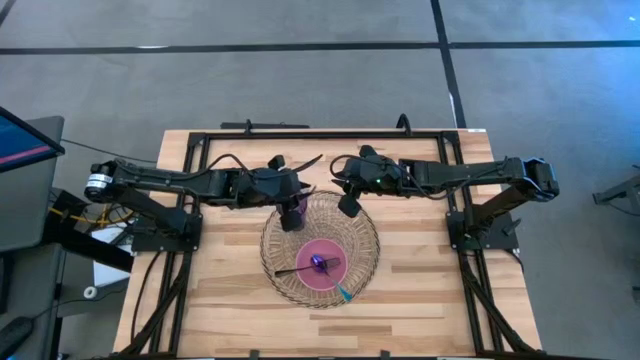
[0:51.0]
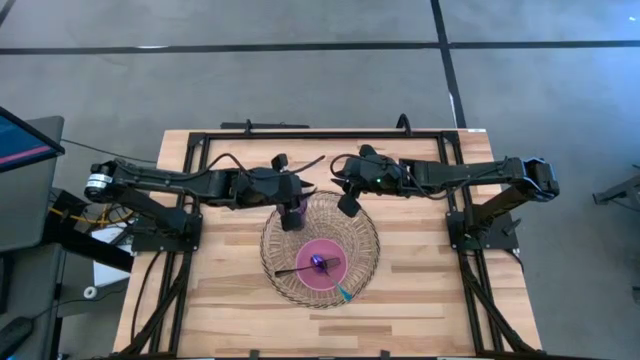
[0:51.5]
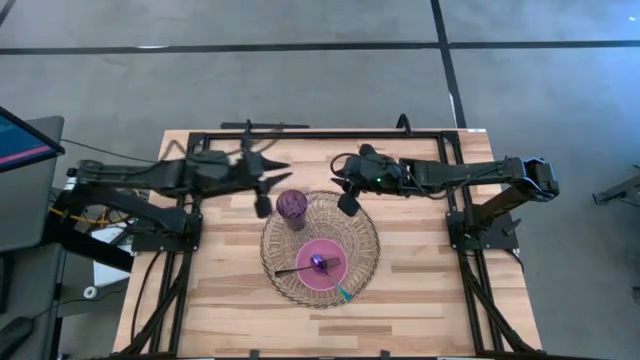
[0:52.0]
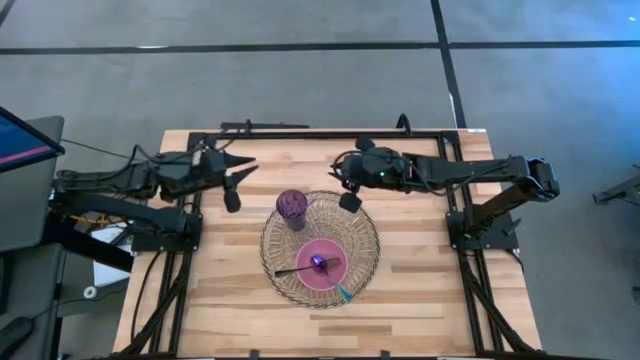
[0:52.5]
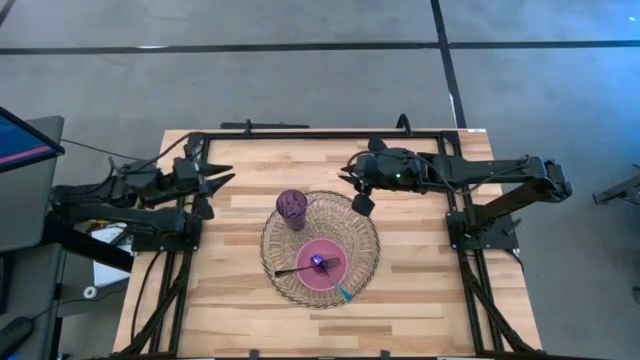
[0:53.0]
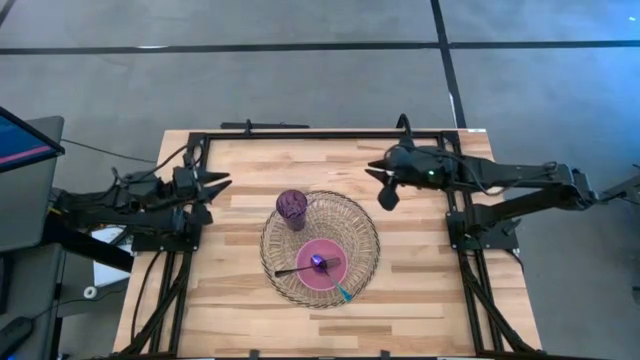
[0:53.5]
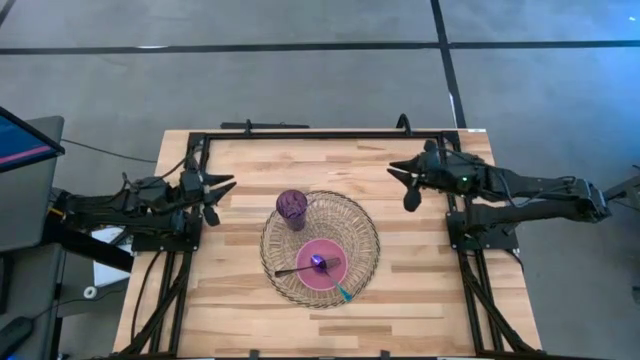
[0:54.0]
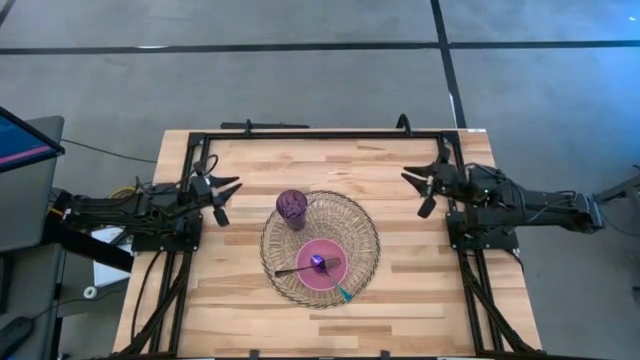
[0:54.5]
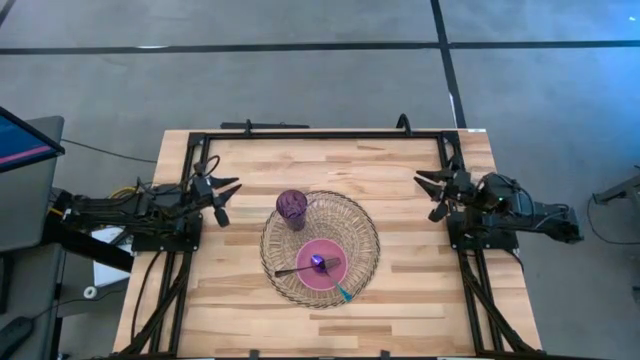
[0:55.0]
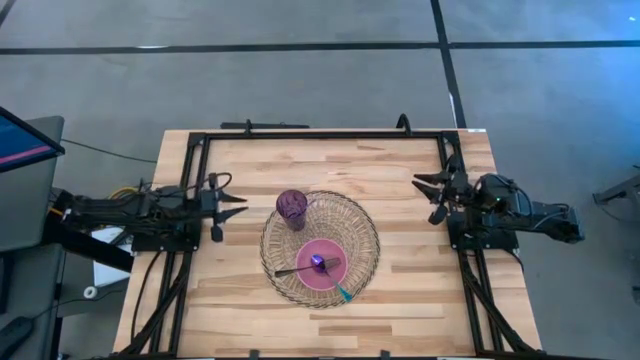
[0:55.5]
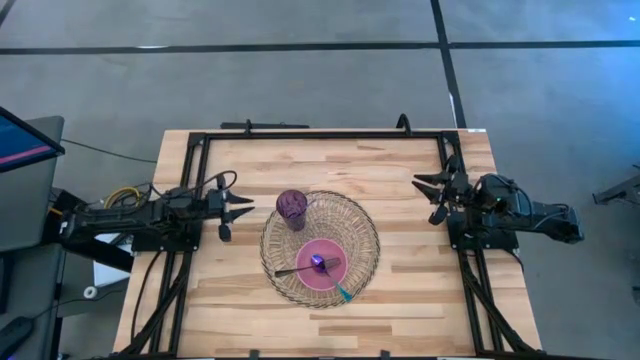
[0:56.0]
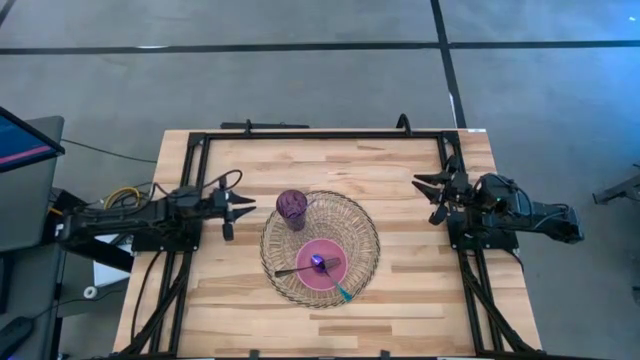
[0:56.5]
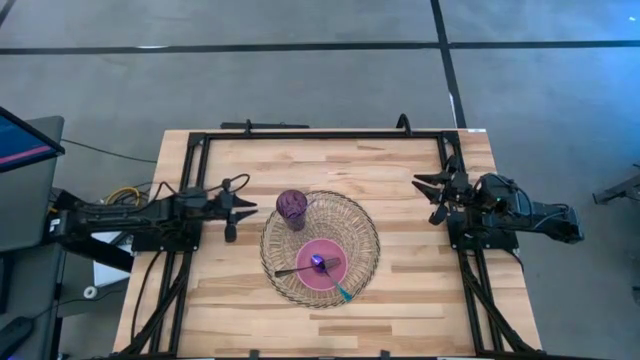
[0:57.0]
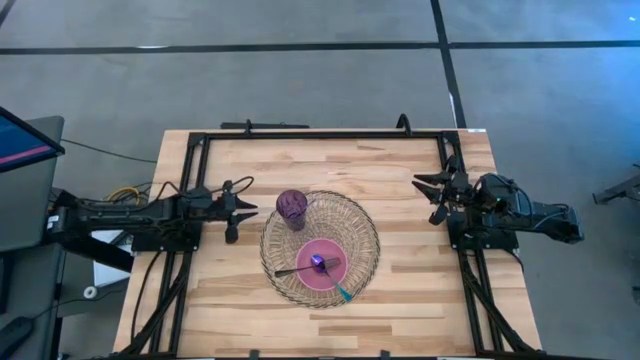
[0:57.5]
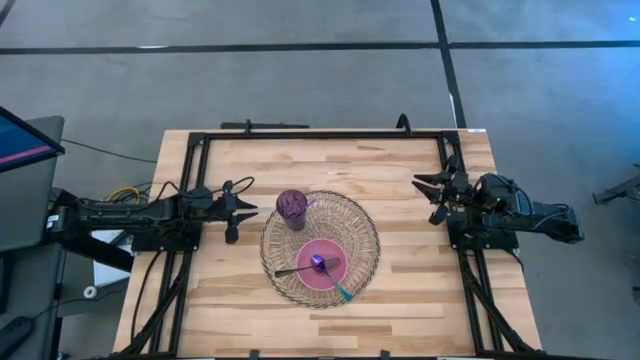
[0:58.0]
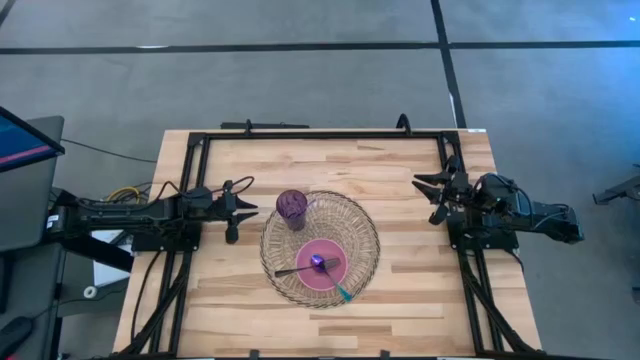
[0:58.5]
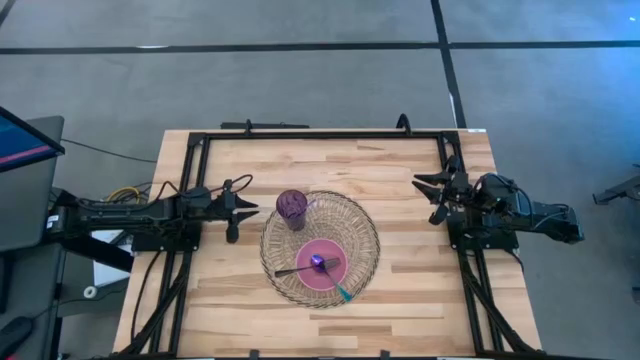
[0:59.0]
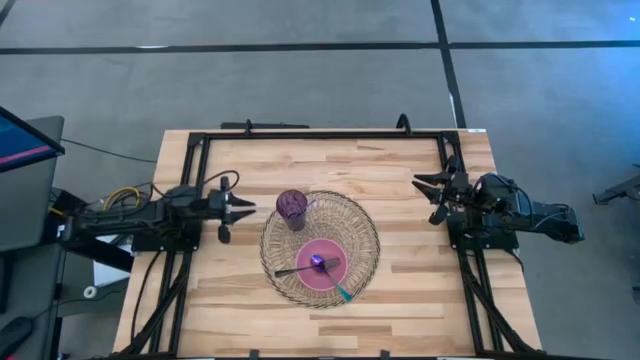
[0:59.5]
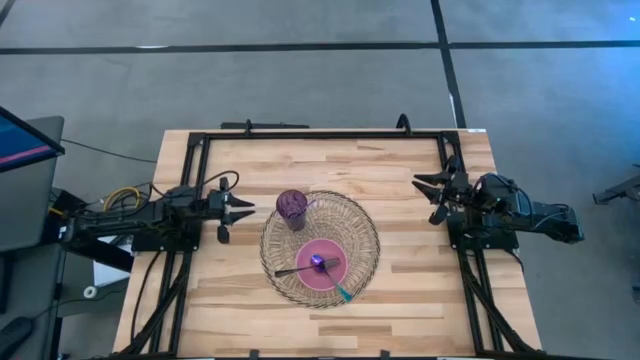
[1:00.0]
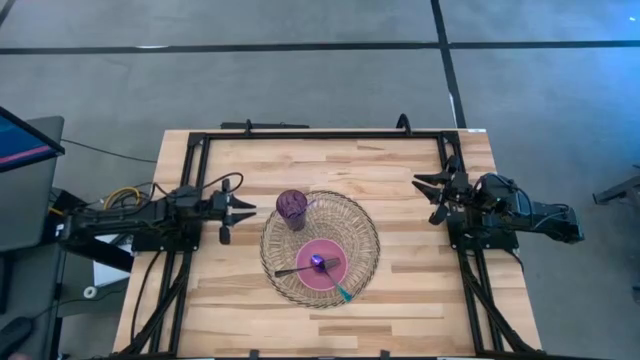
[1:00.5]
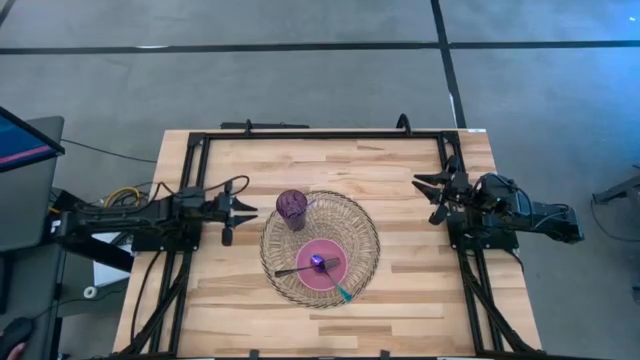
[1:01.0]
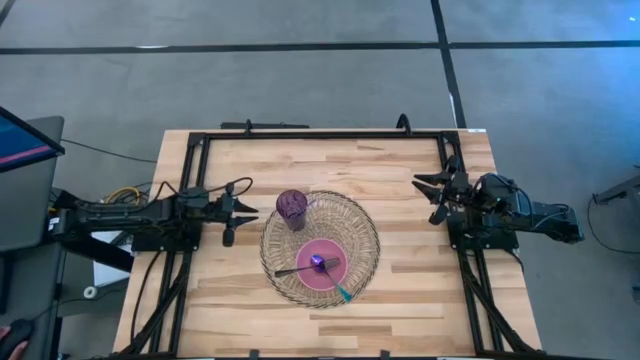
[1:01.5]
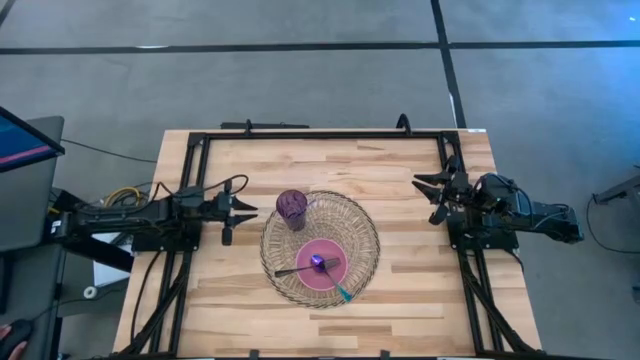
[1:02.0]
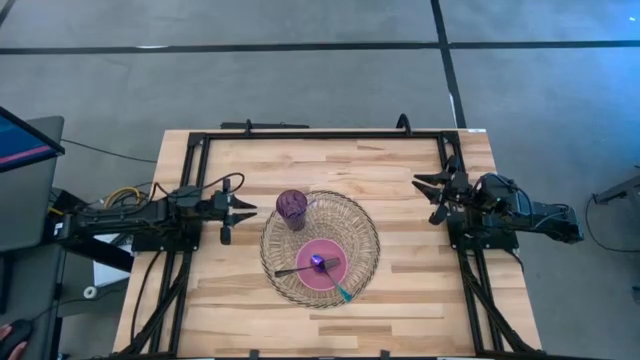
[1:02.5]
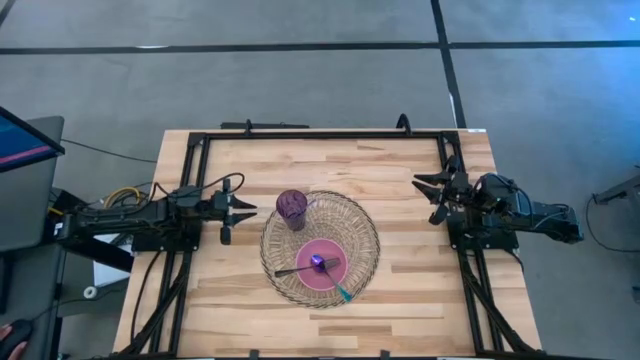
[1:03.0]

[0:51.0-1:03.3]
Task: Pick & Place Utensil
Return to Home Position

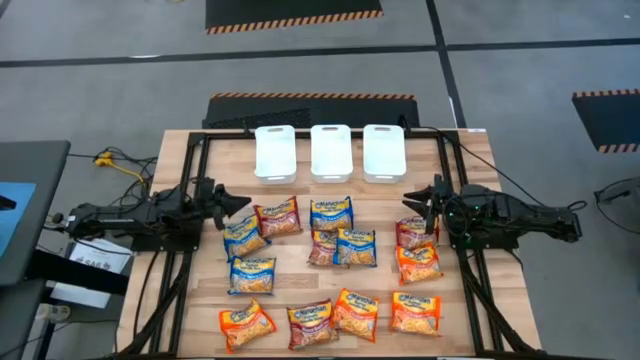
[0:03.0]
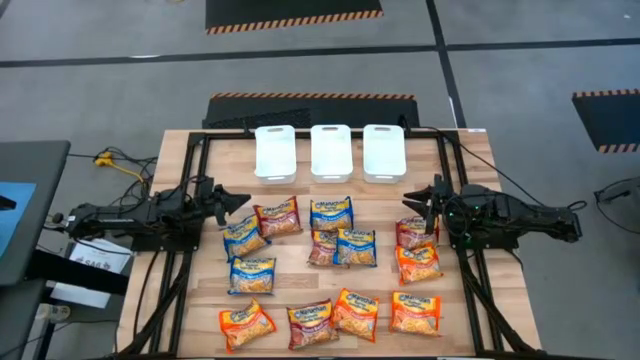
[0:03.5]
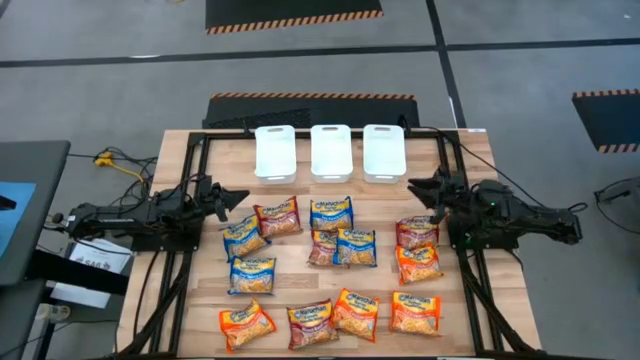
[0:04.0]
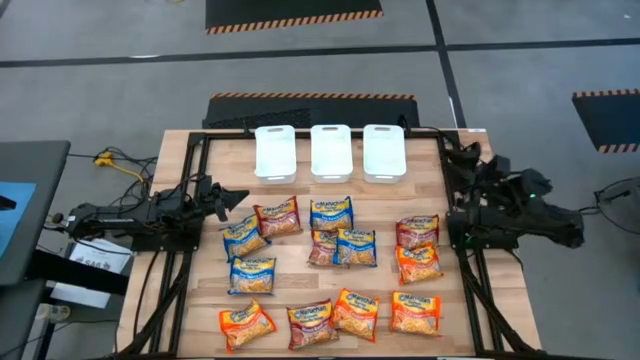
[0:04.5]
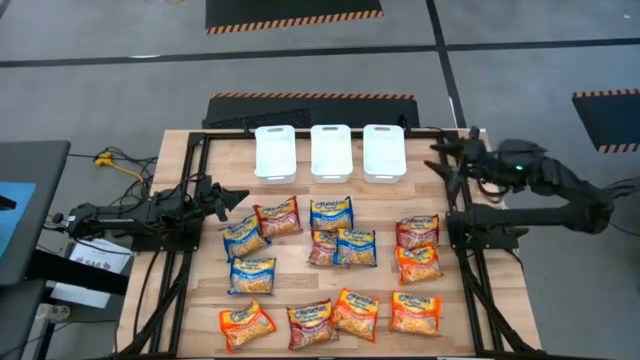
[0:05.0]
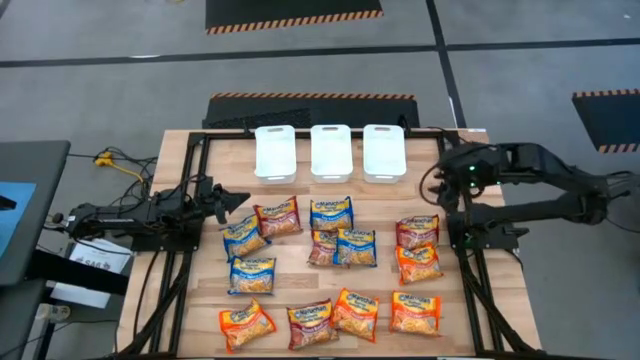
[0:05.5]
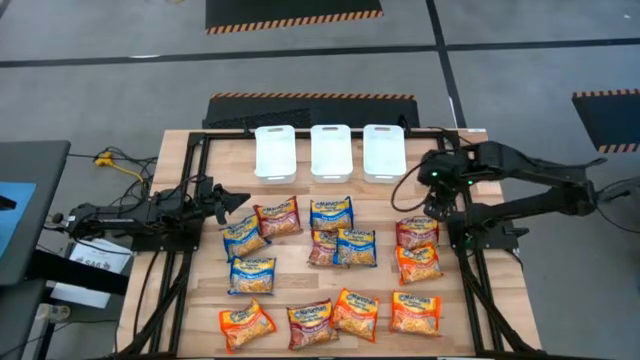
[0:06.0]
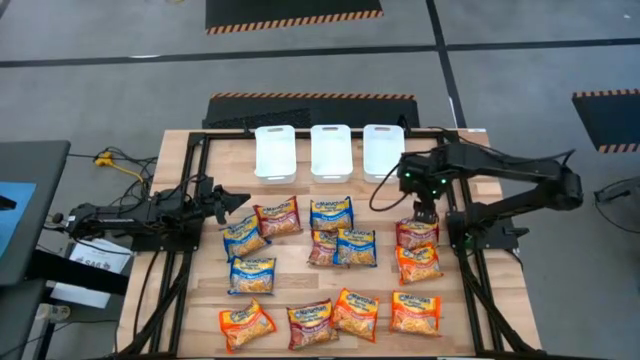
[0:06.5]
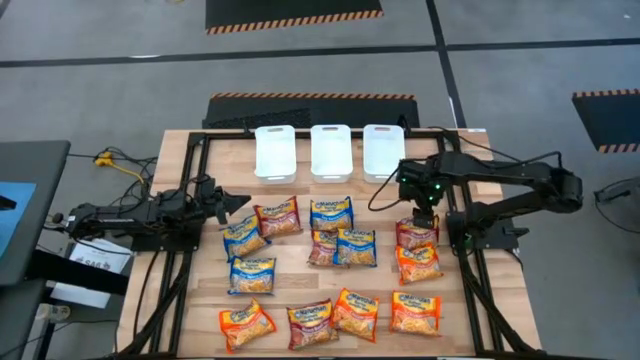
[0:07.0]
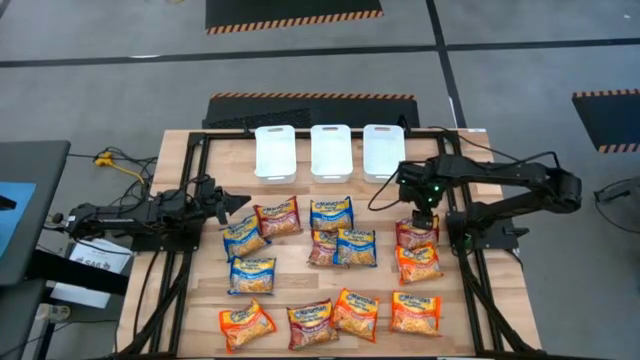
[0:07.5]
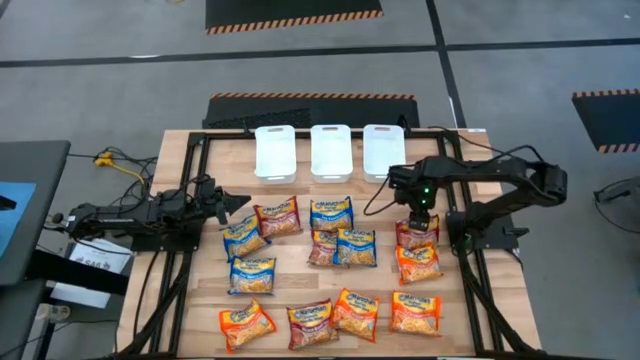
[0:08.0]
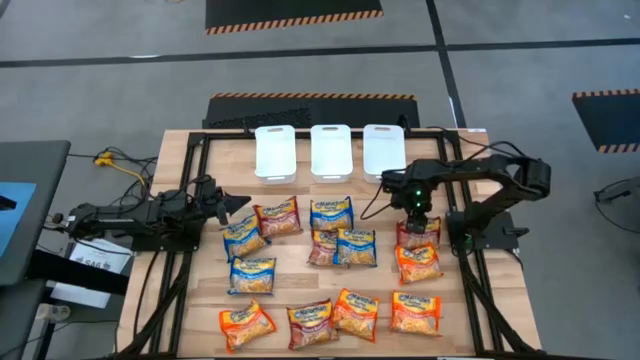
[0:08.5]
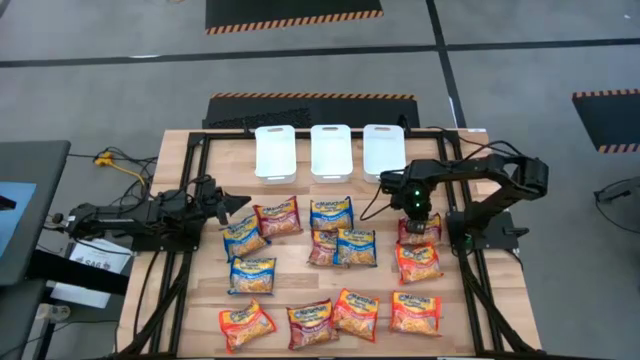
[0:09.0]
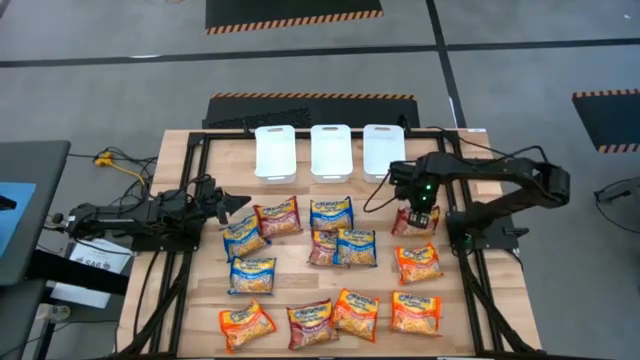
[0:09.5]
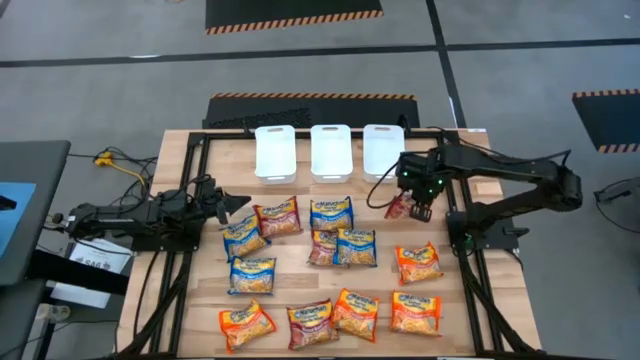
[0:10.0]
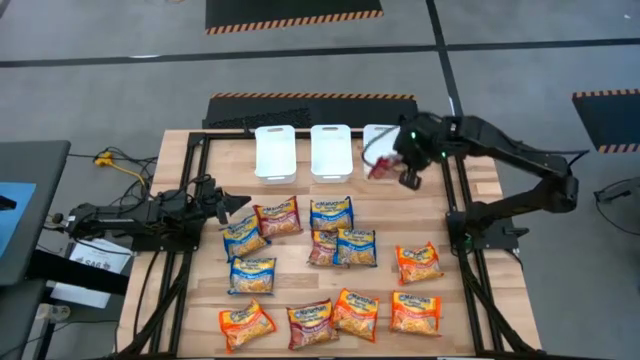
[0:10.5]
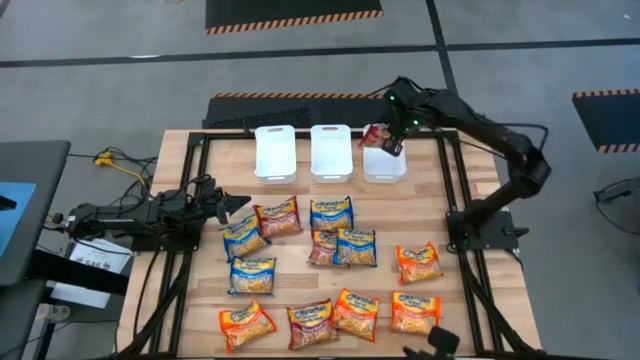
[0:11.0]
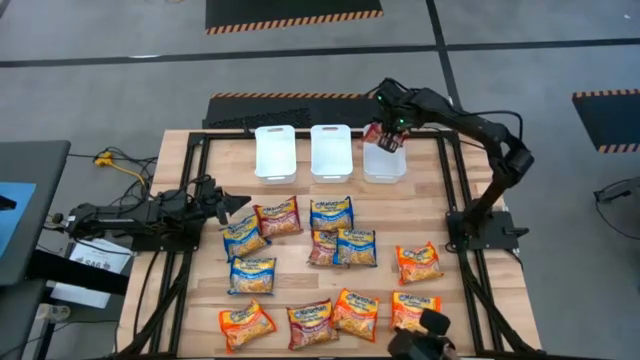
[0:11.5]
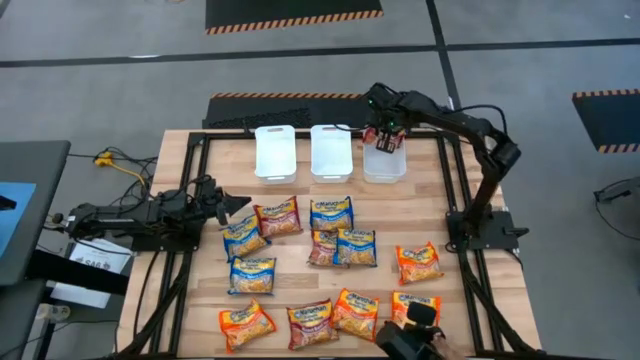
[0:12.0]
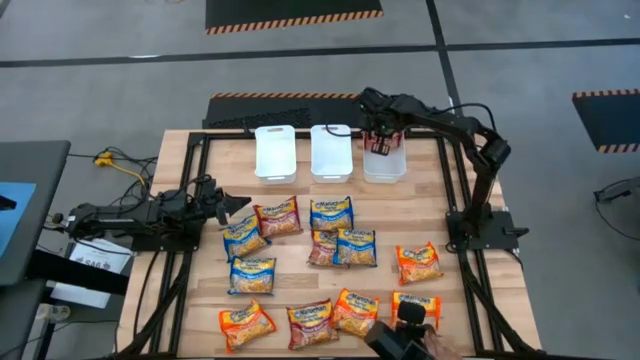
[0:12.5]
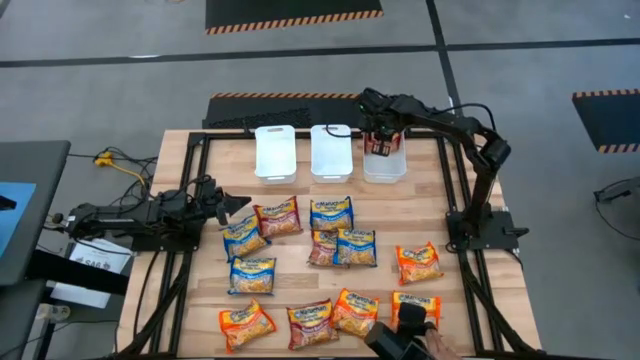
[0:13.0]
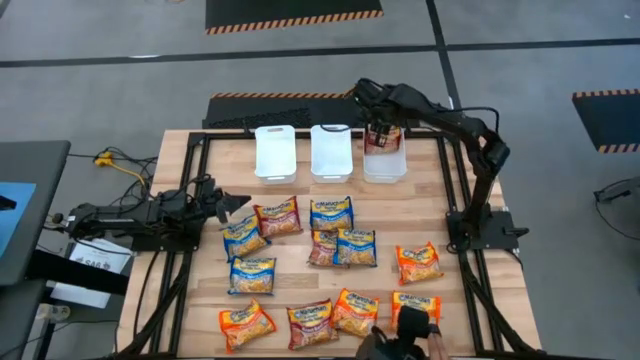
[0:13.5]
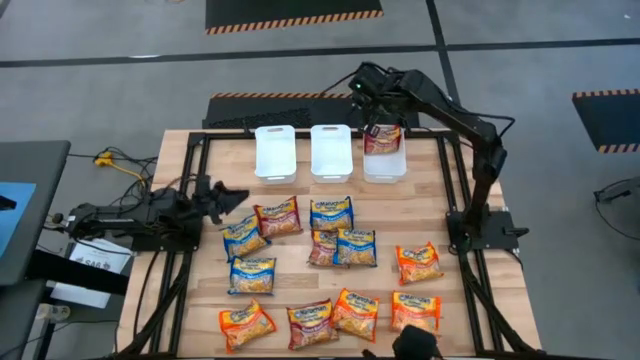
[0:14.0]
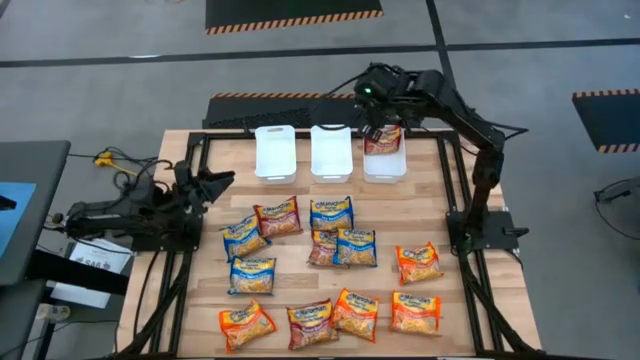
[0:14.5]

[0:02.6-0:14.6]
Task: Sort Maruchan noodles
Put the right red noodle soup pack into the right white bin
